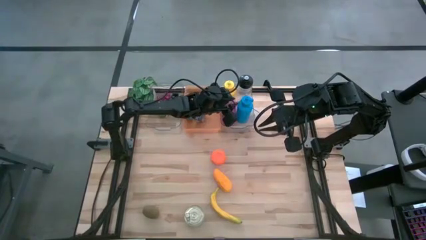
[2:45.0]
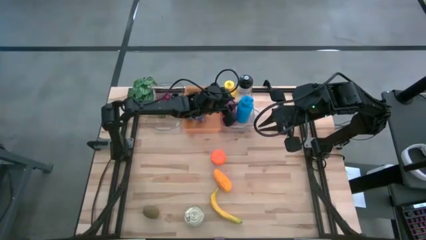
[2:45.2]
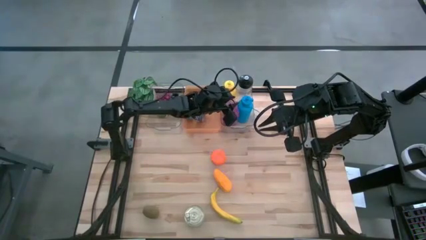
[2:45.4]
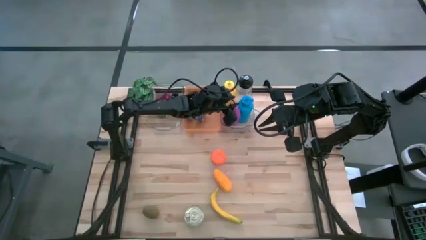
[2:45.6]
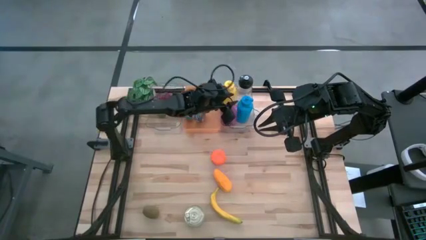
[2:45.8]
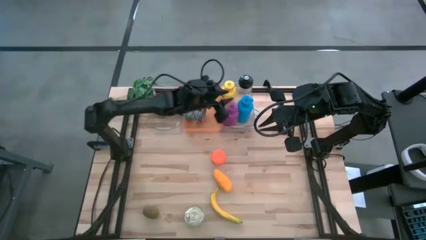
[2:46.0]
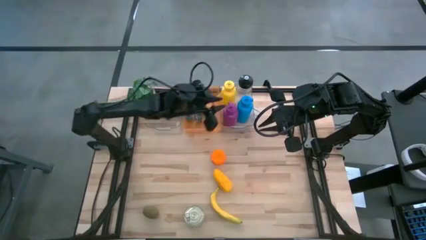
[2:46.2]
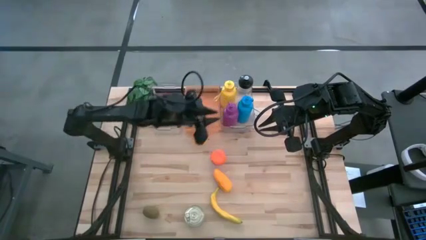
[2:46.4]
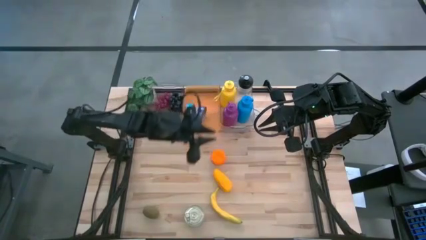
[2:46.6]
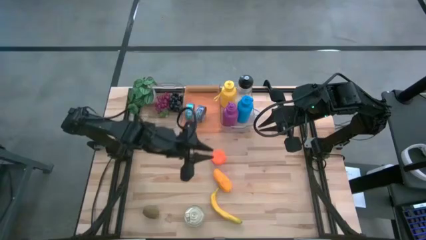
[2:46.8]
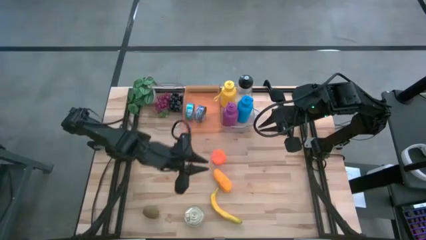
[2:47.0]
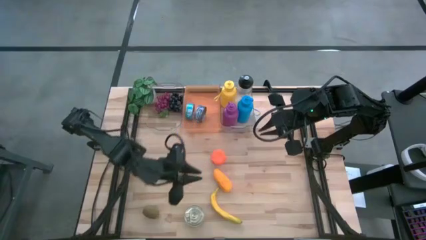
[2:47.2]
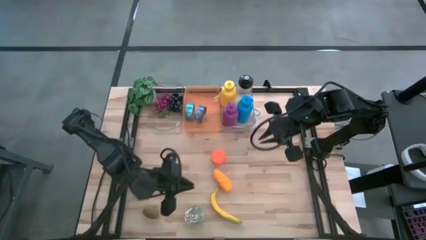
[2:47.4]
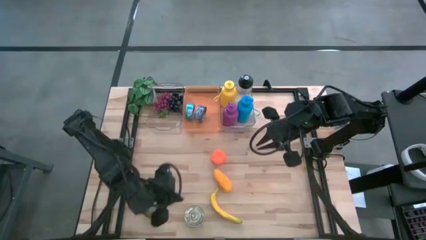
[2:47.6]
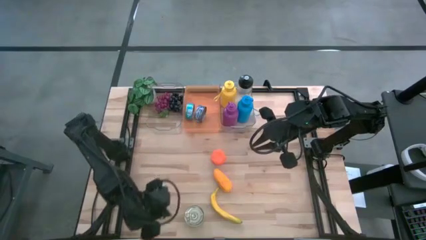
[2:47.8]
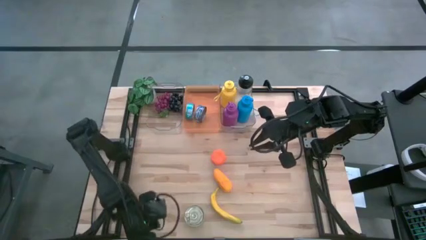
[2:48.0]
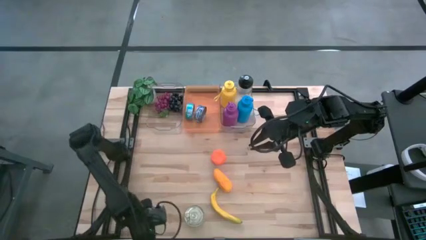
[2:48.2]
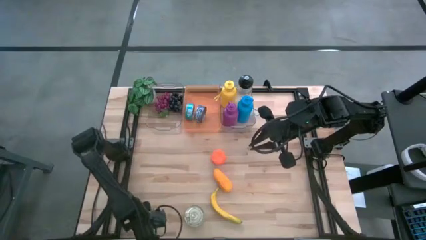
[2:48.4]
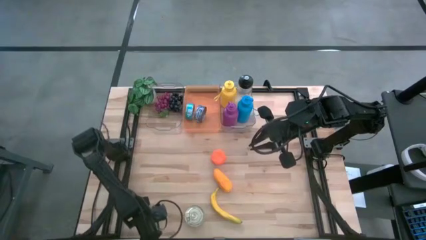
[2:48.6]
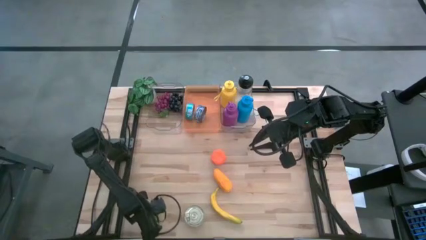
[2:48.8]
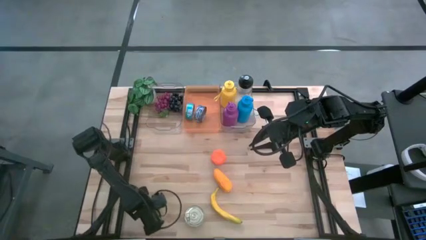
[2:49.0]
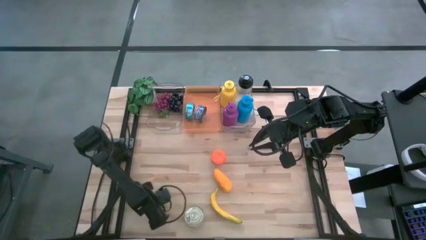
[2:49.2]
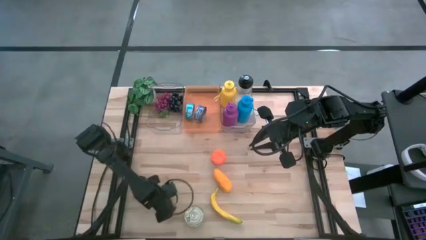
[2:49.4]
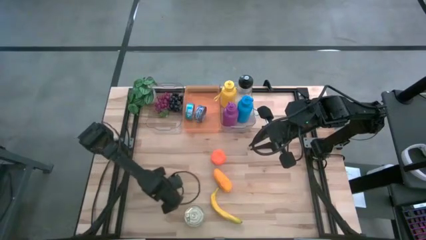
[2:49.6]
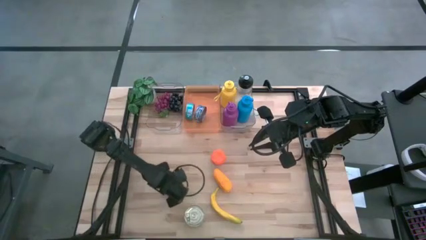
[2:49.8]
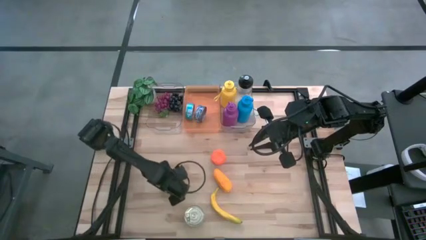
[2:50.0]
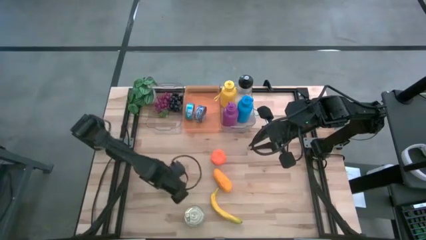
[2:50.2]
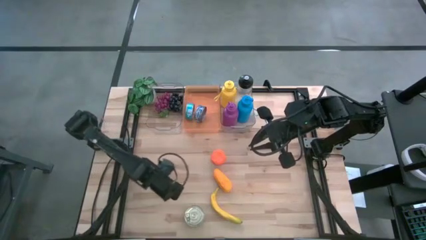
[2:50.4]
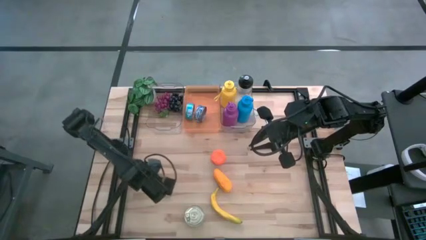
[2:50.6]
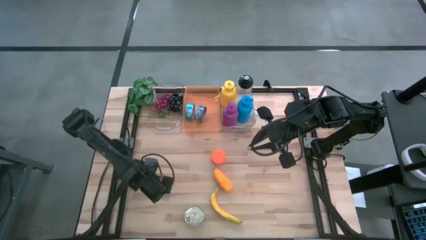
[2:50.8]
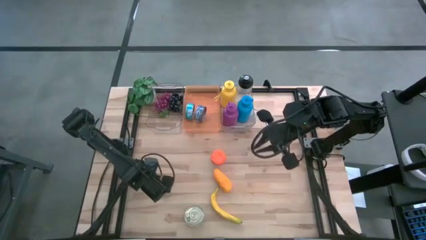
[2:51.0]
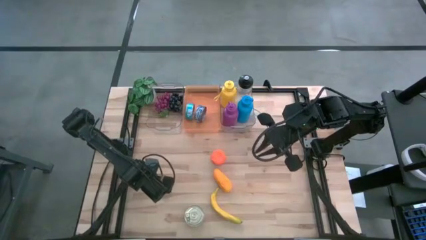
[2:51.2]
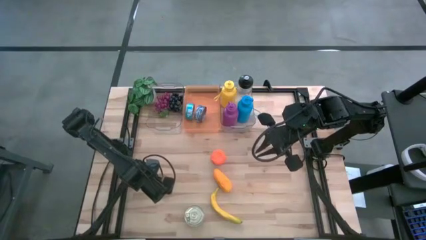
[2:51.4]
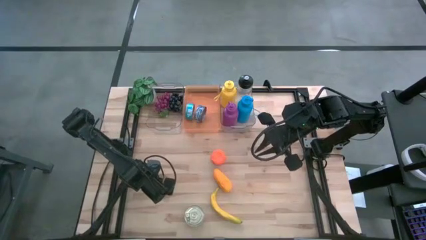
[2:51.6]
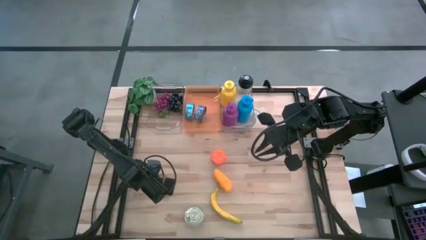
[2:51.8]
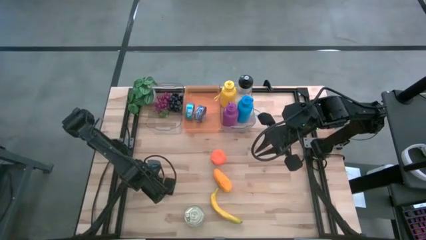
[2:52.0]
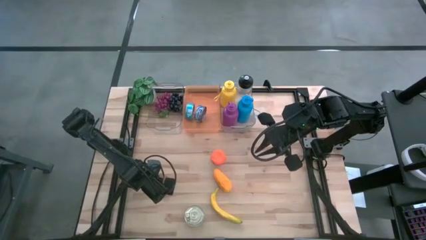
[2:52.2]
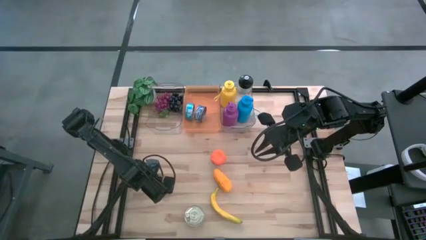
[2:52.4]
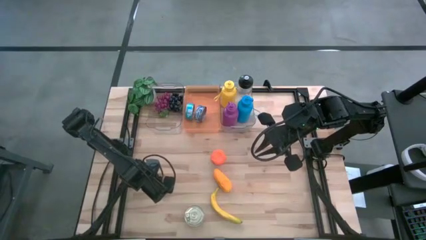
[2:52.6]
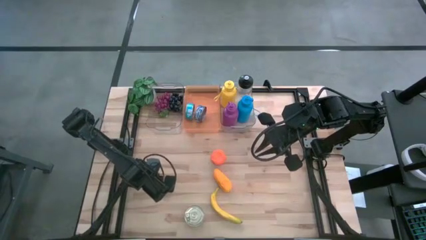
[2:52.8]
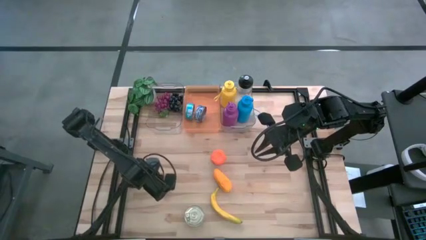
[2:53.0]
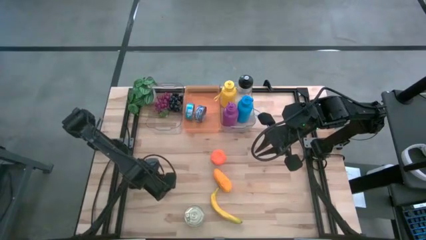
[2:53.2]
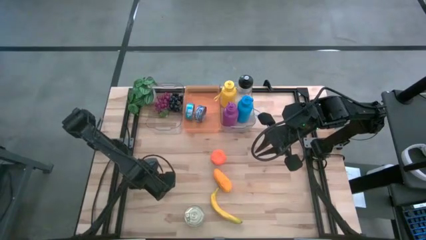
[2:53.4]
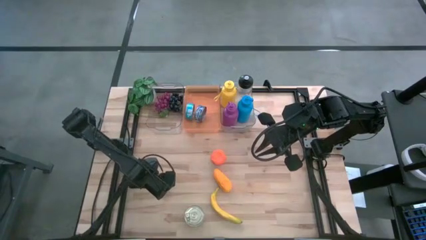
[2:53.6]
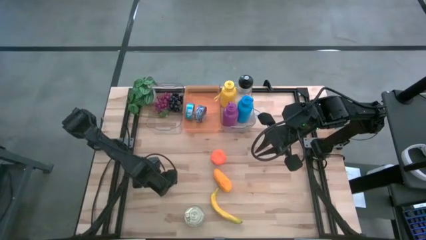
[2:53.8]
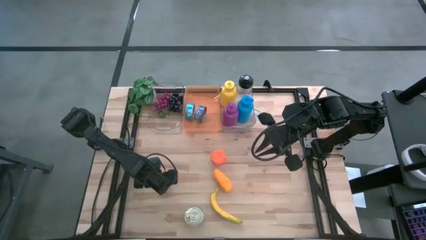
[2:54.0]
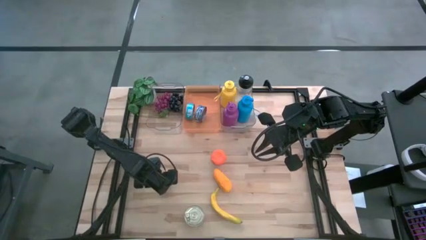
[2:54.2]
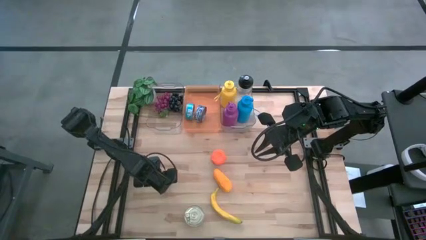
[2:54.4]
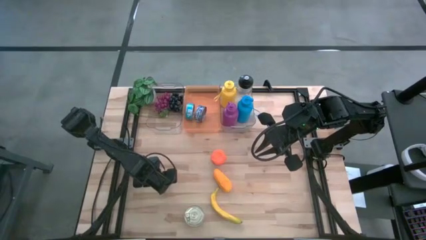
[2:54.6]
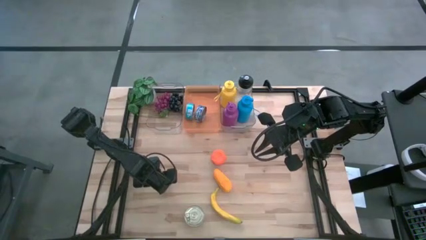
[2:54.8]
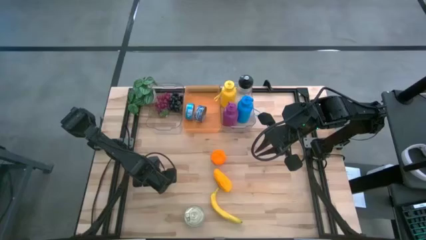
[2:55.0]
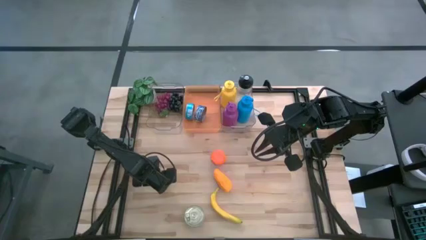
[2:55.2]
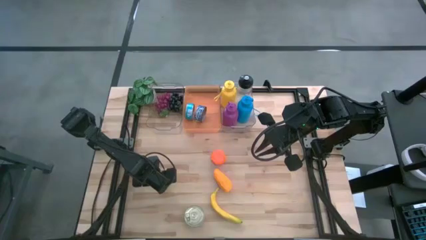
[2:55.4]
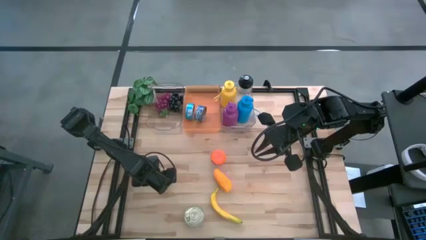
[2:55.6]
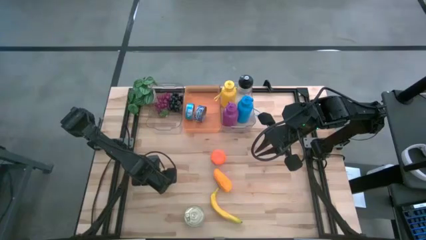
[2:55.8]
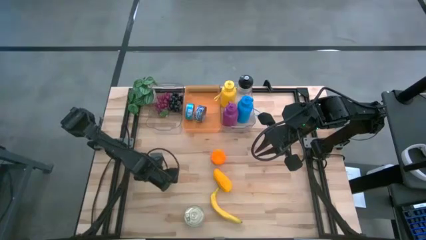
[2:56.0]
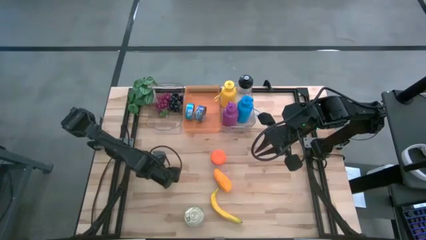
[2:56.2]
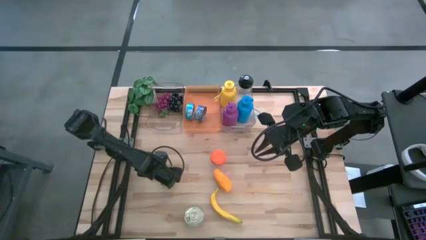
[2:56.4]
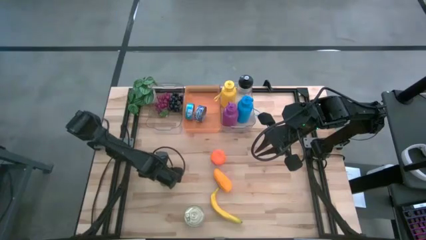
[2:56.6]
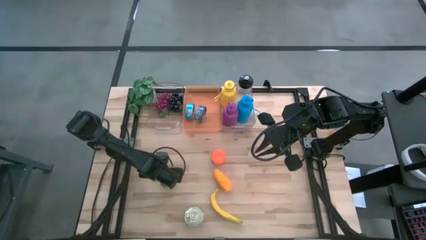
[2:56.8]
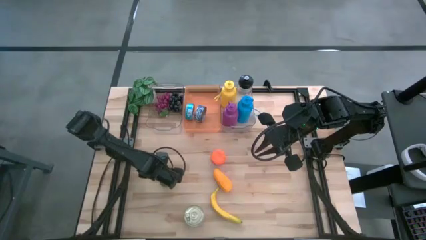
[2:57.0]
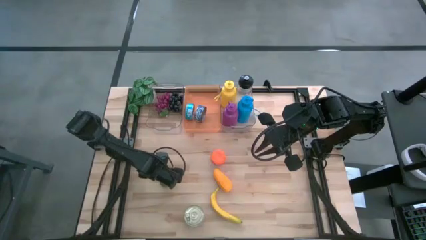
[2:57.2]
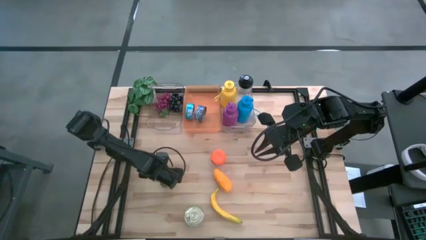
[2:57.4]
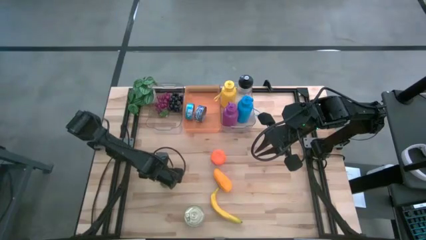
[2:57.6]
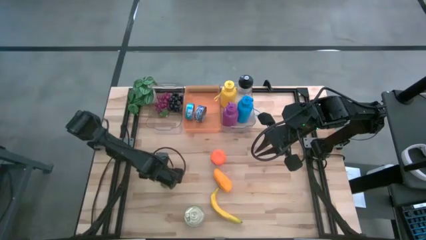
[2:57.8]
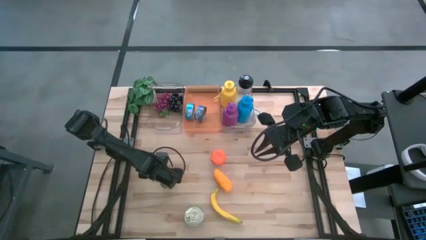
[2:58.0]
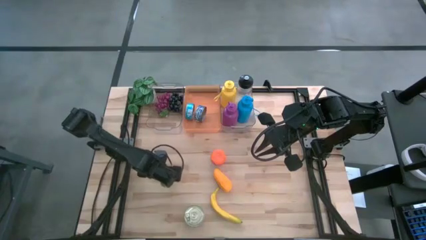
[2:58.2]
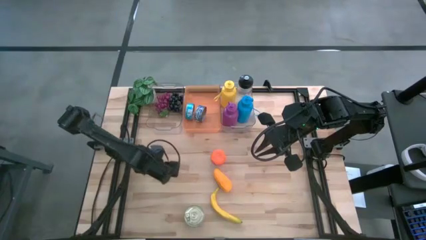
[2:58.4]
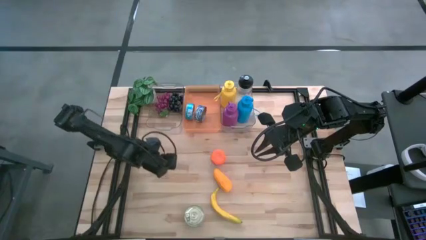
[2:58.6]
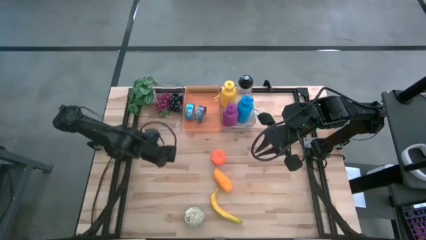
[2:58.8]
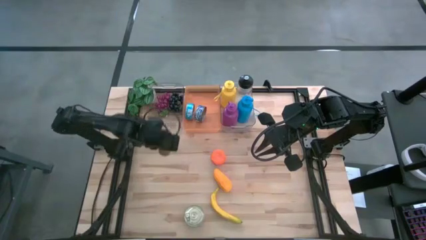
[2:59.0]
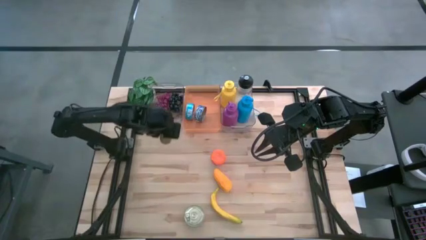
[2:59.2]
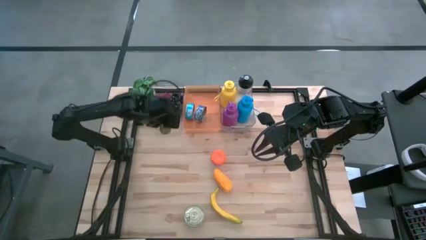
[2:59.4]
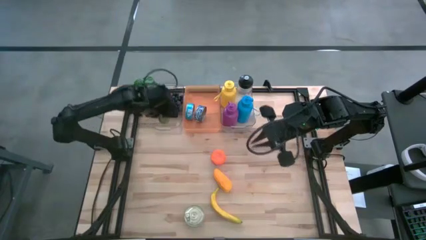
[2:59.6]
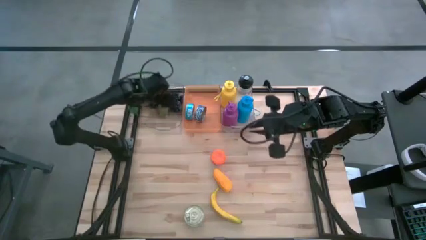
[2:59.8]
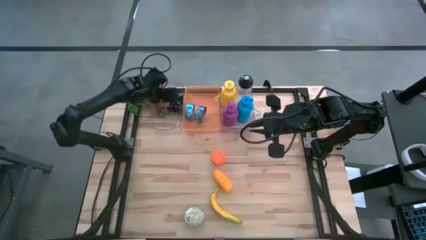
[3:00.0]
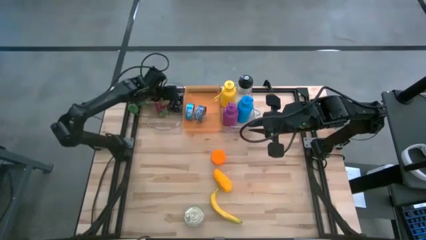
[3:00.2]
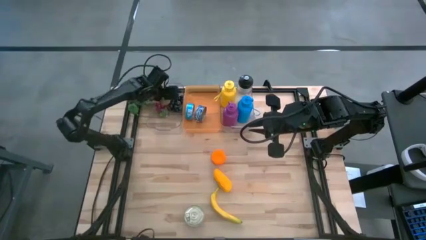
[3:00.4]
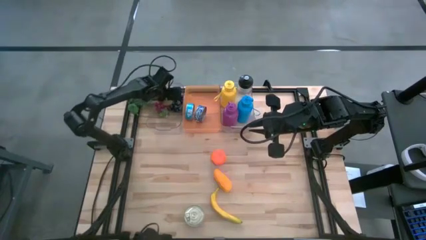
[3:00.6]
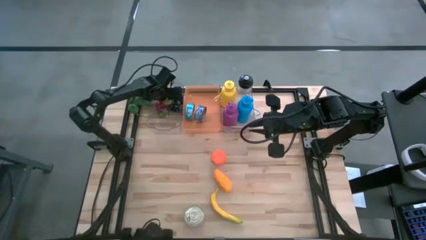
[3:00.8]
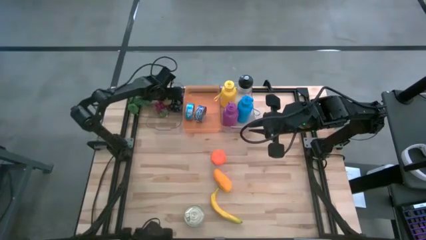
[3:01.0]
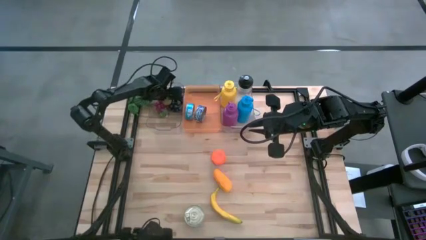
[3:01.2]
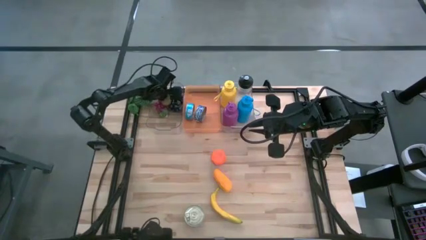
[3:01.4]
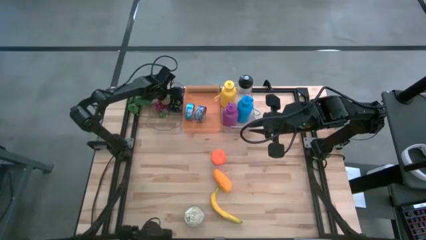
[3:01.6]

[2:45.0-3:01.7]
Task: Pick & Place Food Item
Put the kiwi into the left transparent bin

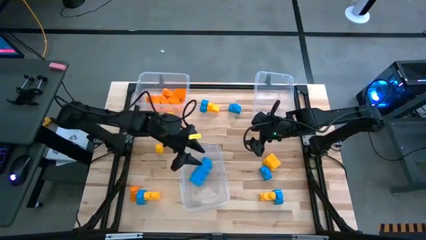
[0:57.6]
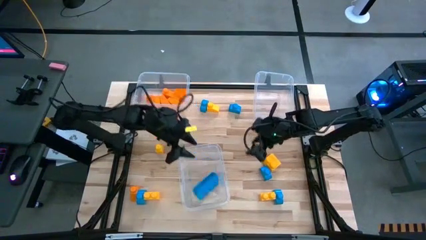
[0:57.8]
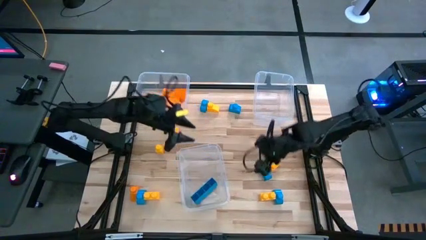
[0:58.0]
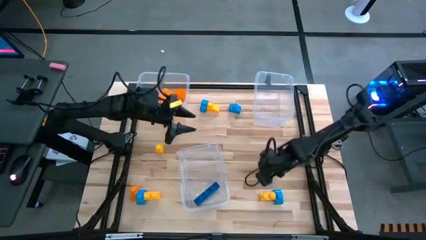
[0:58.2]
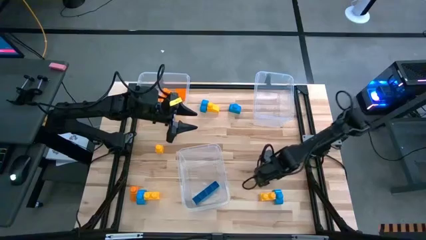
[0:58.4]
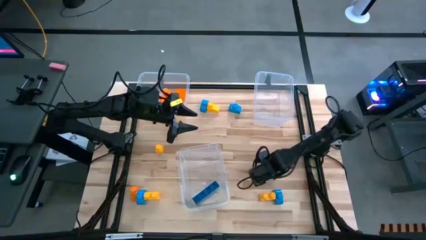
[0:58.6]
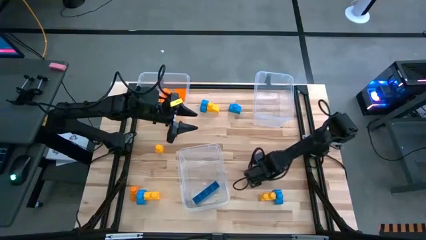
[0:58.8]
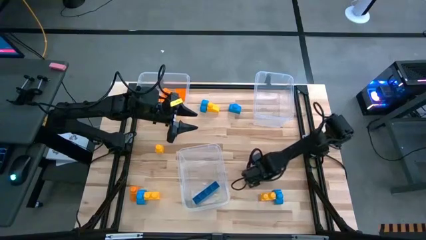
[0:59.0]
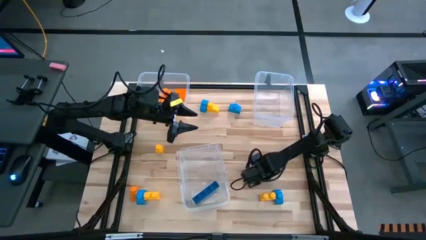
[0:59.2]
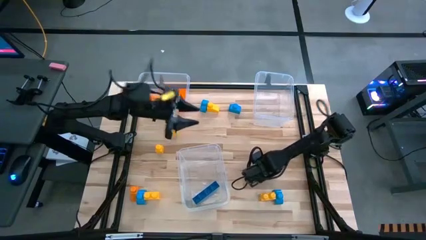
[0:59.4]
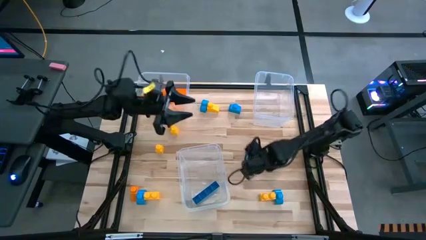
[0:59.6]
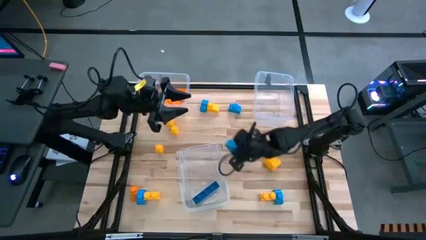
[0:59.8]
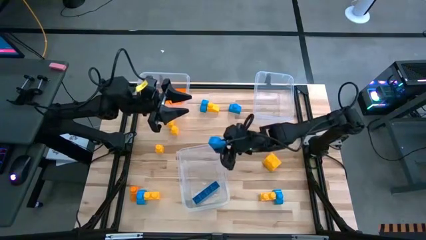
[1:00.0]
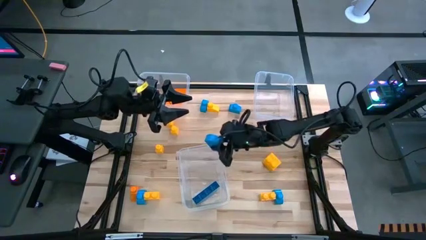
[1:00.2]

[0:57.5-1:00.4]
Task: Sort blocks
Put the blue game piece into the bottom transparent bin
